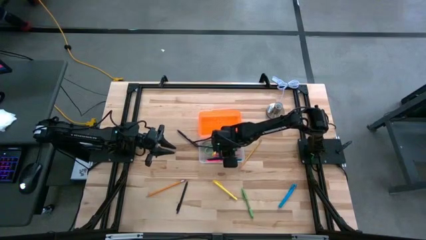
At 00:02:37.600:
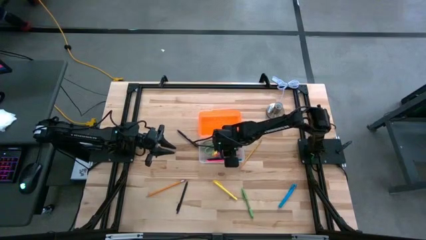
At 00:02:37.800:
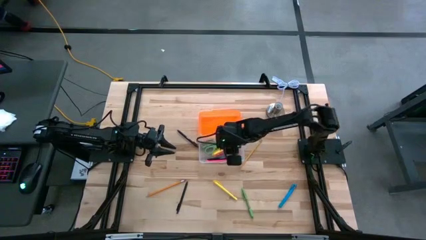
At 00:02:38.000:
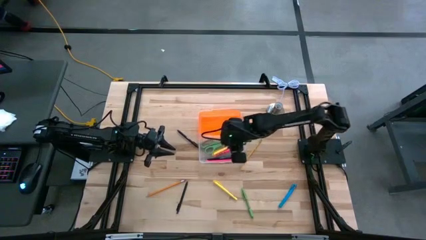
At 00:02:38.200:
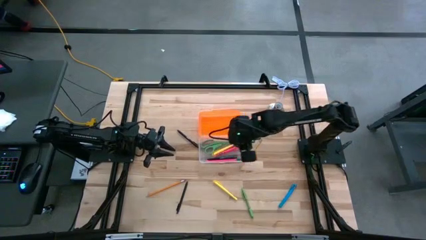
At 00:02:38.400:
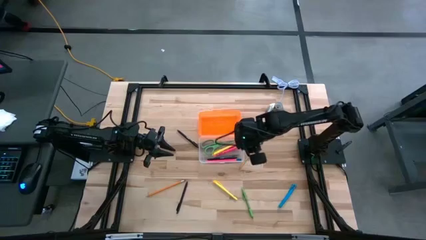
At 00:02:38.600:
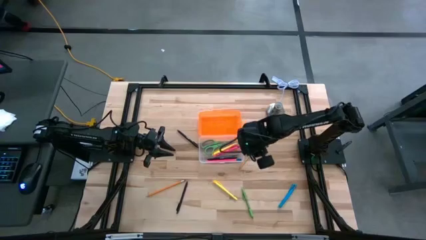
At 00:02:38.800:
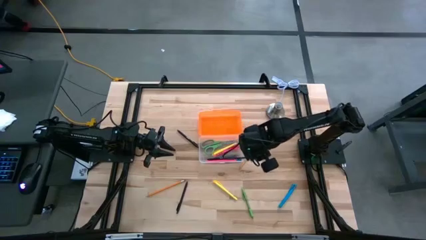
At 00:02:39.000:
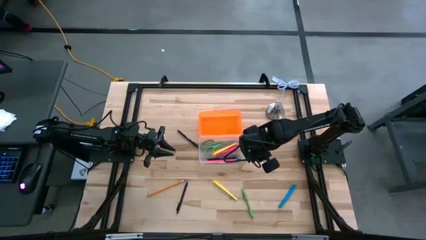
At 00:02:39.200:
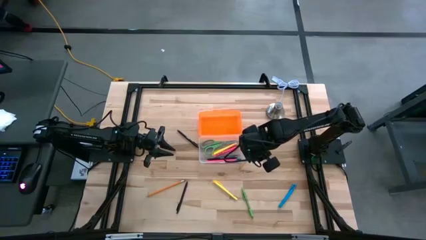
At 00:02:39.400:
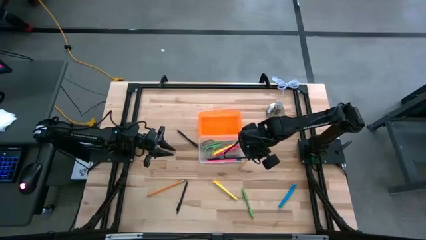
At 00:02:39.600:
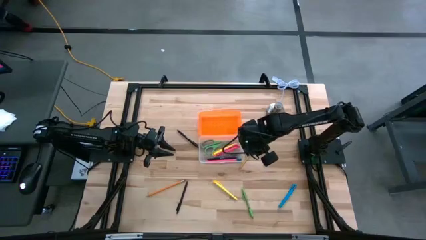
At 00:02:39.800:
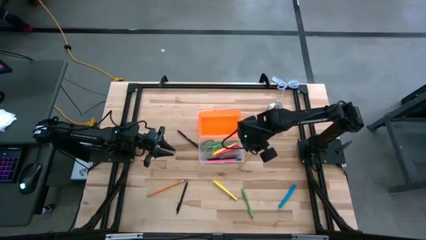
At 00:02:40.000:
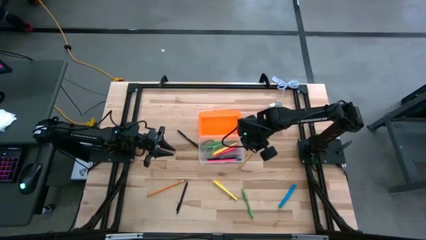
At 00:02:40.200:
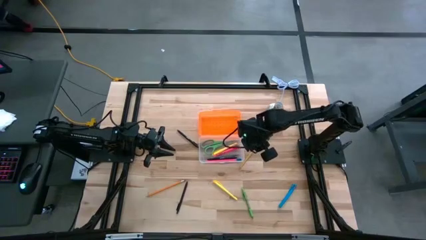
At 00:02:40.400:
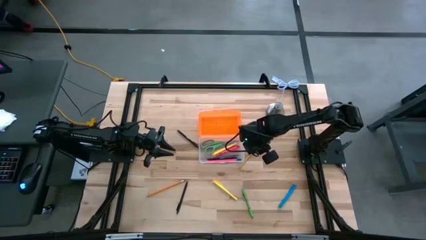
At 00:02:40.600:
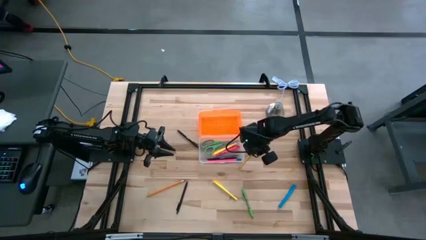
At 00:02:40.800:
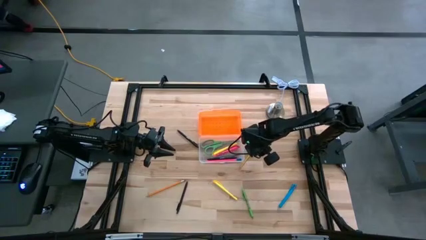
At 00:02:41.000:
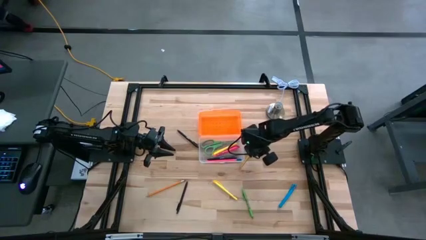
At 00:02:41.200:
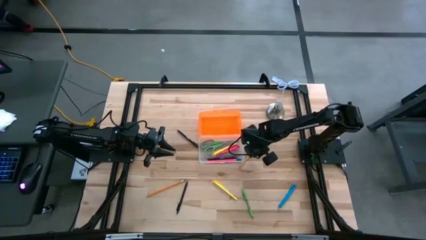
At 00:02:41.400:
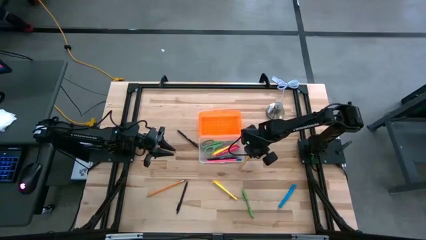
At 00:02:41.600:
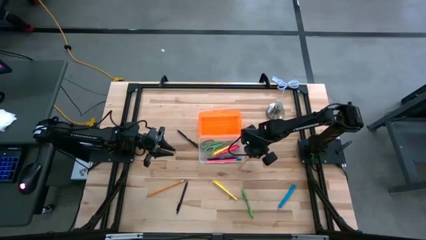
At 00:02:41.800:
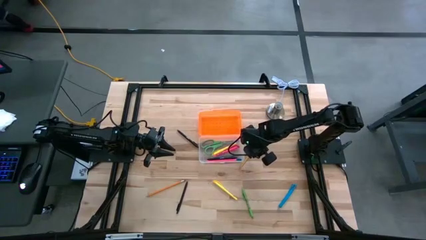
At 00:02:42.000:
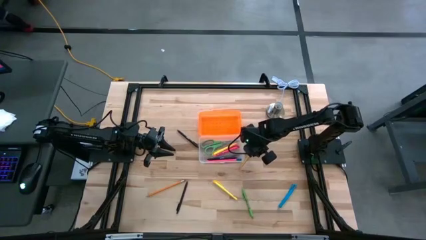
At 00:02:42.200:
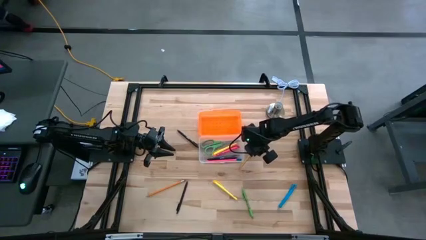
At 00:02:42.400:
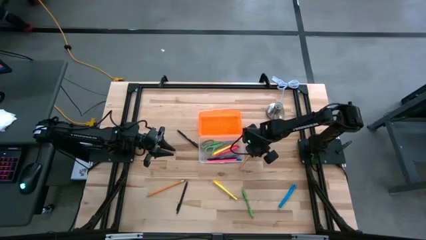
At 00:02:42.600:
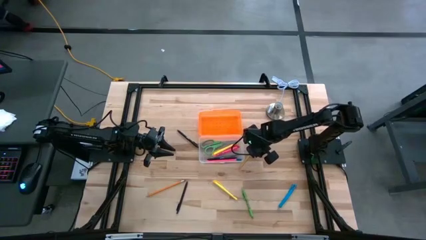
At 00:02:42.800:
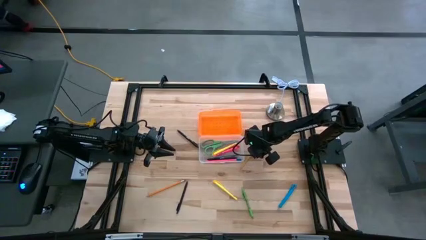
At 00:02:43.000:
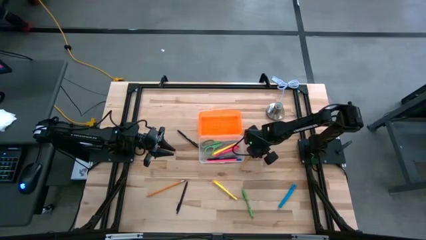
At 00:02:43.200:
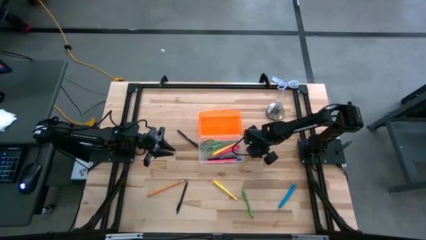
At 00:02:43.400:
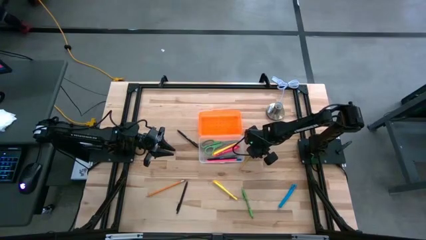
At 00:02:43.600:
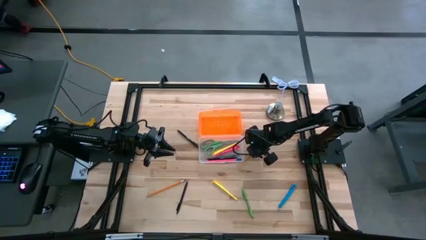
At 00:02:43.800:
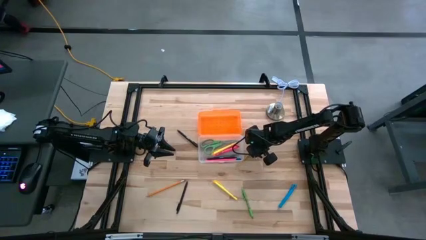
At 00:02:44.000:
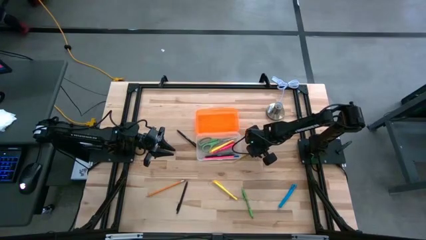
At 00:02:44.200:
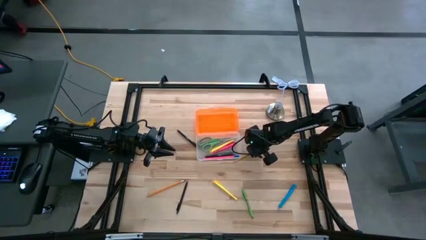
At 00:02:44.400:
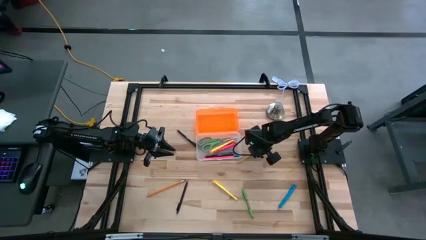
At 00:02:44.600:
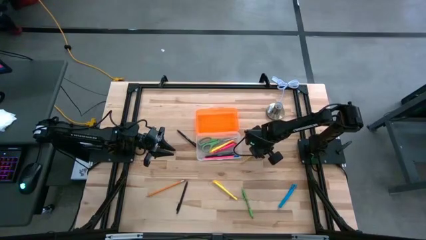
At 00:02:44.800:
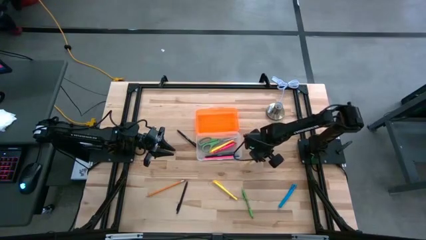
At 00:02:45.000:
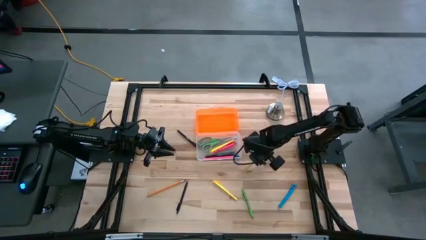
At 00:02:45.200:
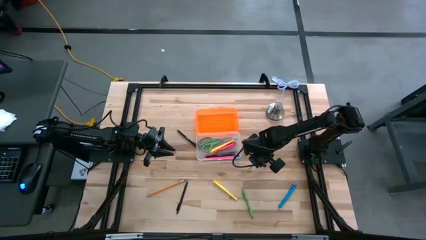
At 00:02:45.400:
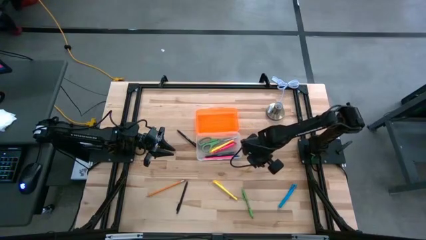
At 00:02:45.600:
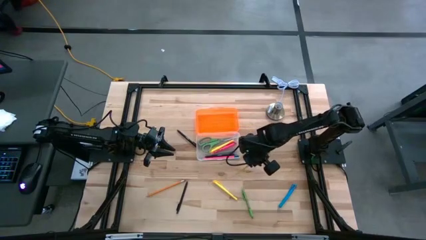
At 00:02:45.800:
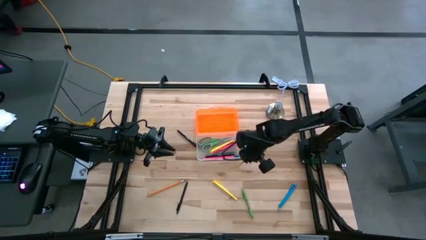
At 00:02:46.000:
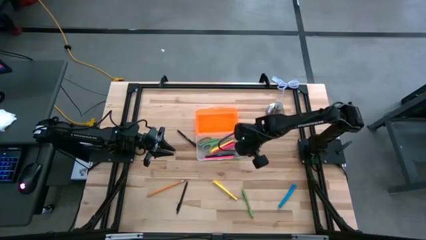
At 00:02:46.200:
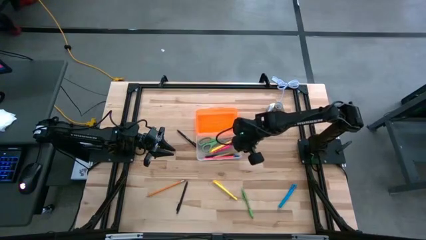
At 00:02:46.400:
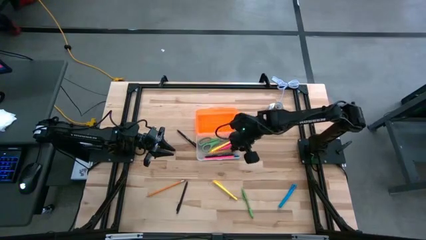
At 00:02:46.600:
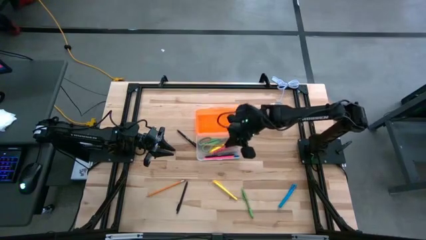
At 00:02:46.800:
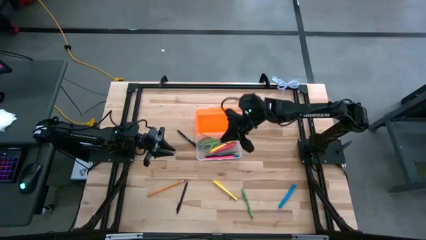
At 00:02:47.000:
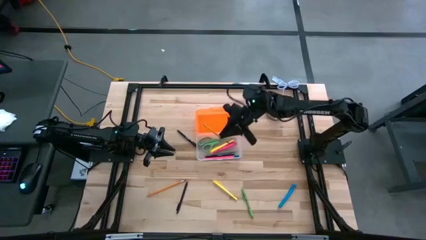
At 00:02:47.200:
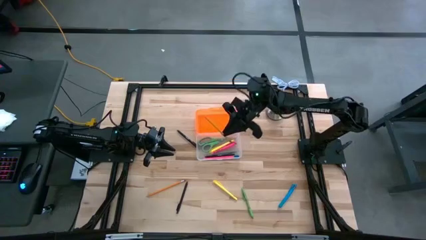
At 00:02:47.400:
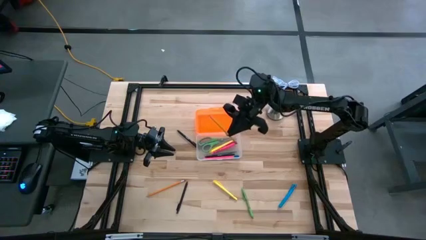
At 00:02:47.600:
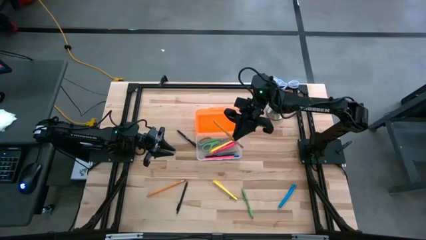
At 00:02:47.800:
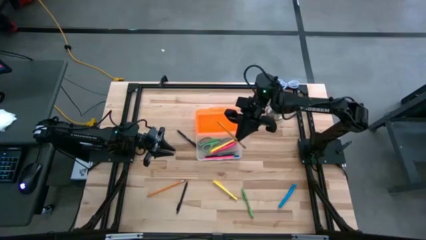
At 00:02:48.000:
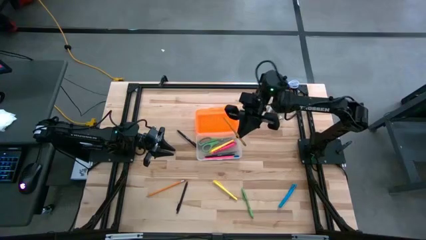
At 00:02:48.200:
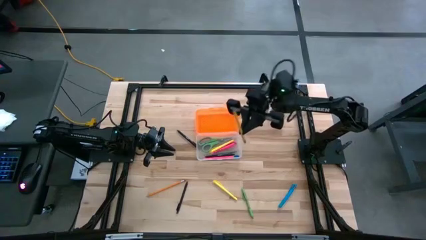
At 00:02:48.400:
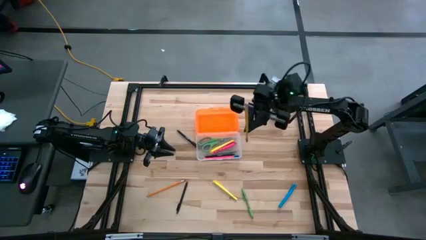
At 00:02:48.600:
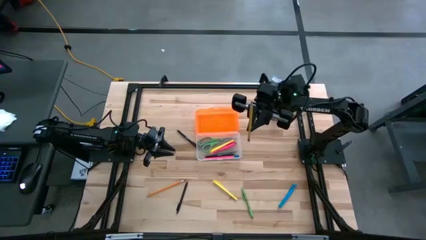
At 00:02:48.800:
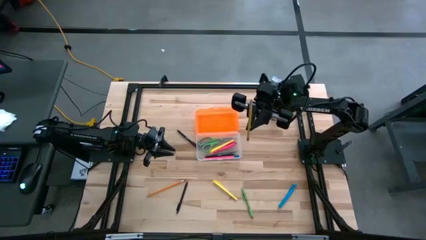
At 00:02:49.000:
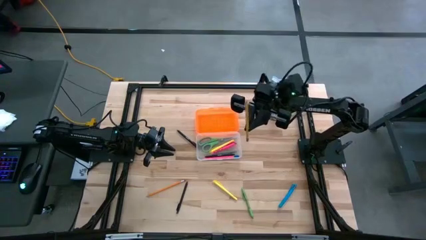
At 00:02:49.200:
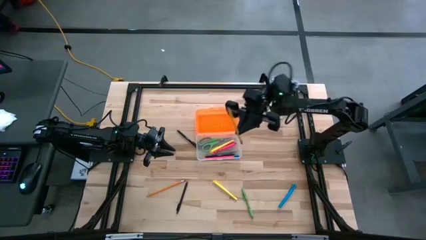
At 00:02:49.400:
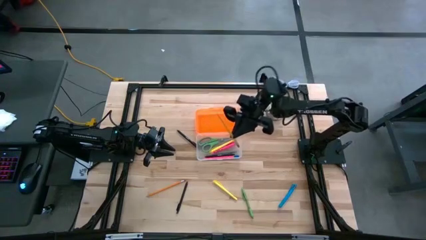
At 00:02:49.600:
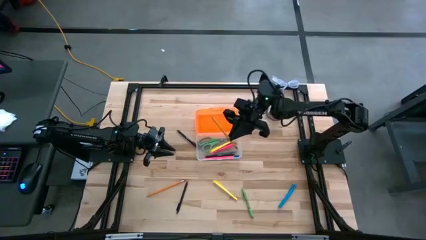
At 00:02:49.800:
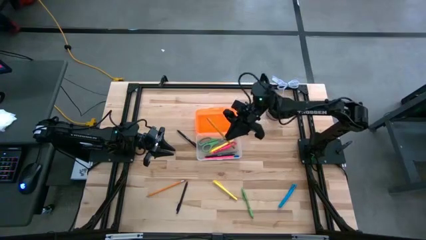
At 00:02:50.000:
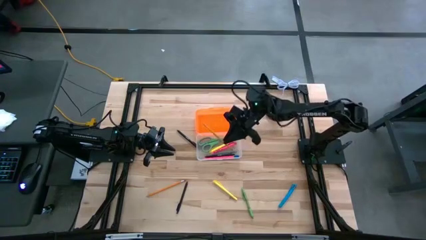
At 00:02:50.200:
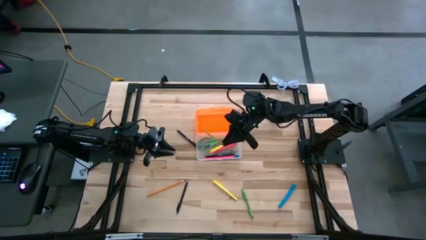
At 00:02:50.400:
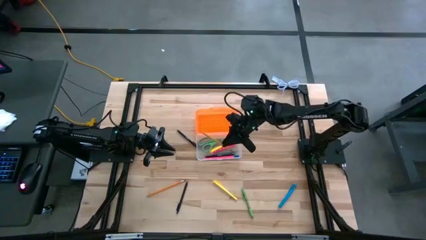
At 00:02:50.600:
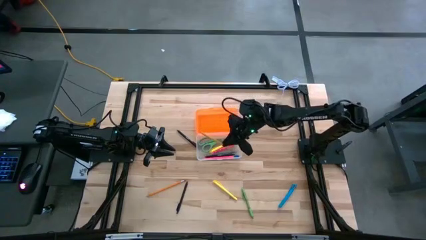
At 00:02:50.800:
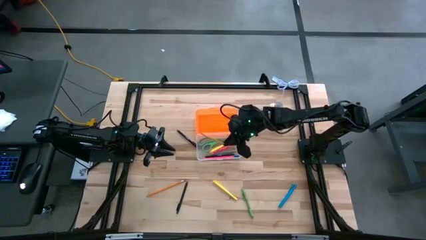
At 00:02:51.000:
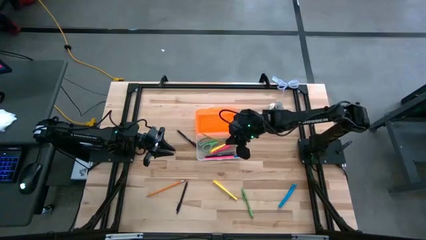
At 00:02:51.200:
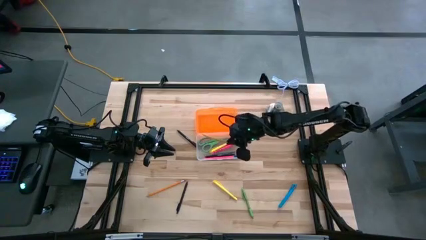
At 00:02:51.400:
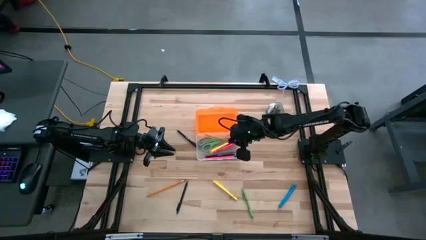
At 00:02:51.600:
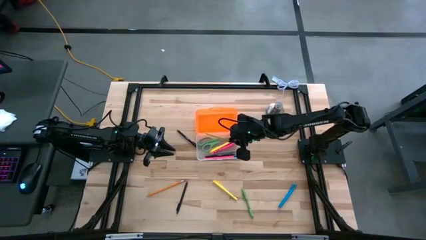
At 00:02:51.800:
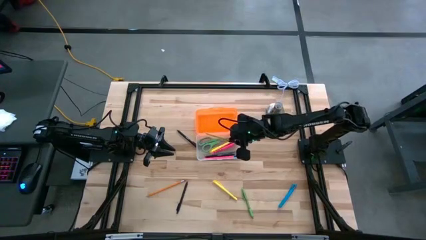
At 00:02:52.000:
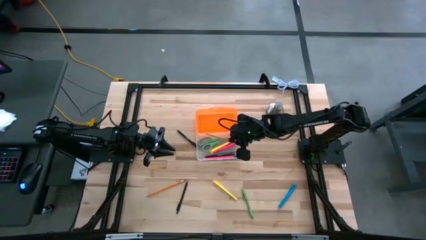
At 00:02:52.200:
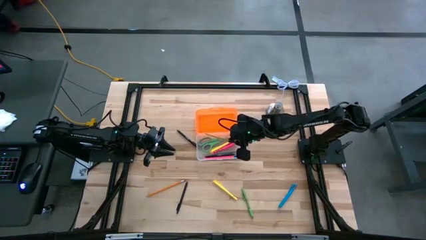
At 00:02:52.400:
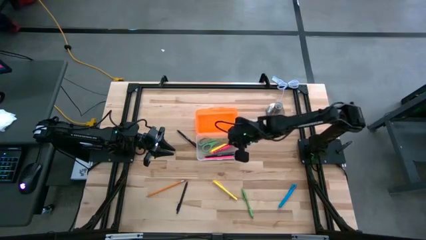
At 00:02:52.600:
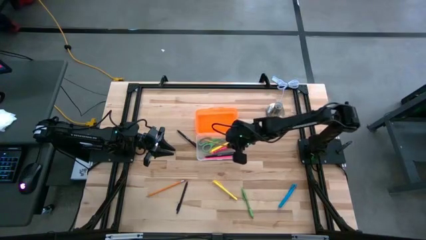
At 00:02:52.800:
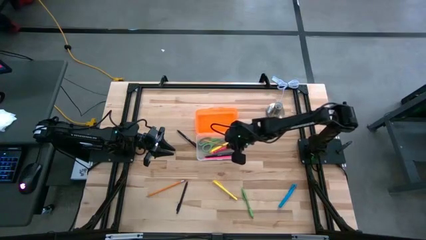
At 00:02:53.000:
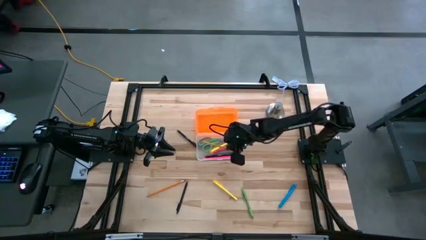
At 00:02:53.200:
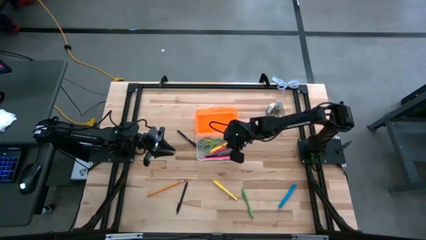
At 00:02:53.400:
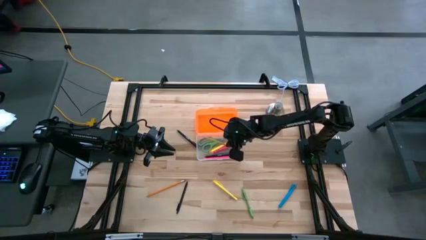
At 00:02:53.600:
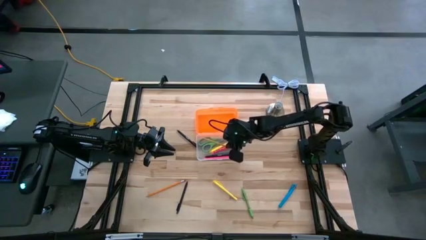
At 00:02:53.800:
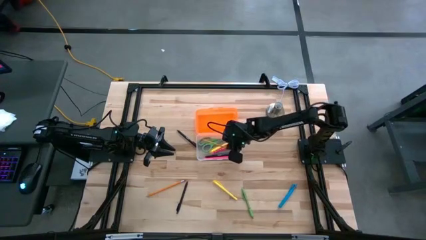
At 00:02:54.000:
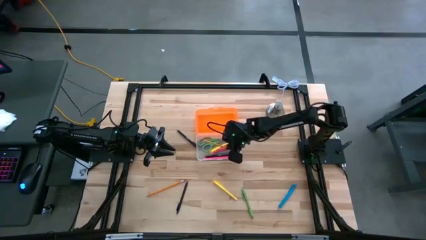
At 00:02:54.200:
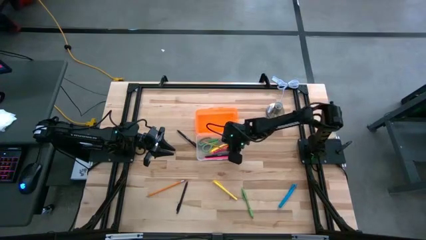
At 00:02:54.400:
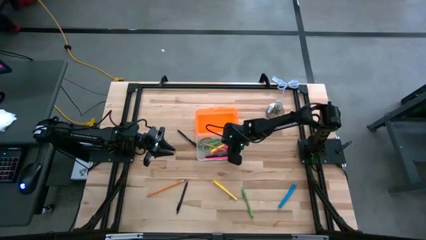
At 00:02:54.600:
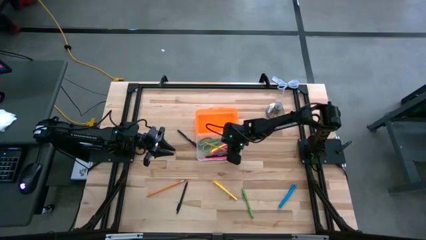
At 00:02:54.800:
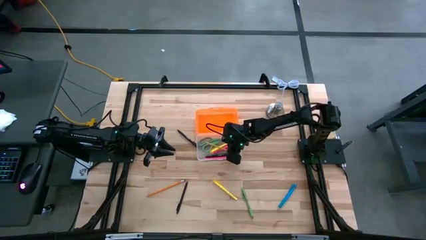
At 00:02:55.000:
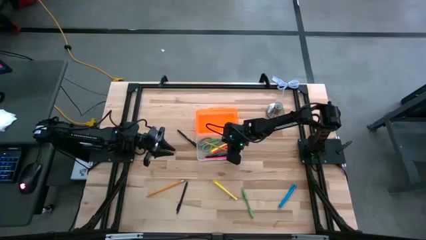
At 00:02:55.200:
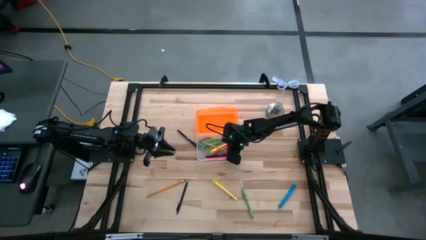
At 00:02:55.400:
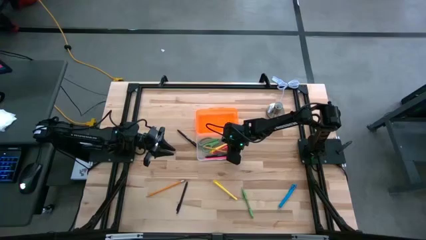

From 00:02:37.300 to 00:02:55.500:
Task: Pick & place school supplies into a supply box
Put the yellow pen into the container
